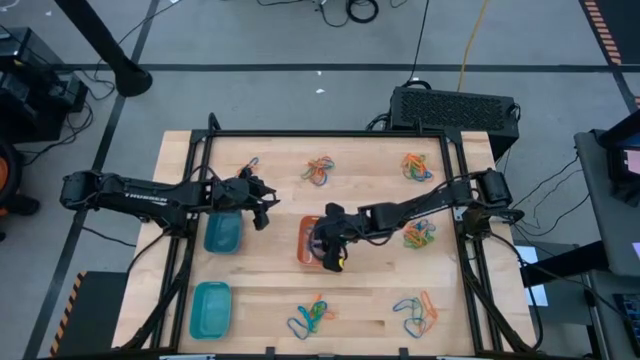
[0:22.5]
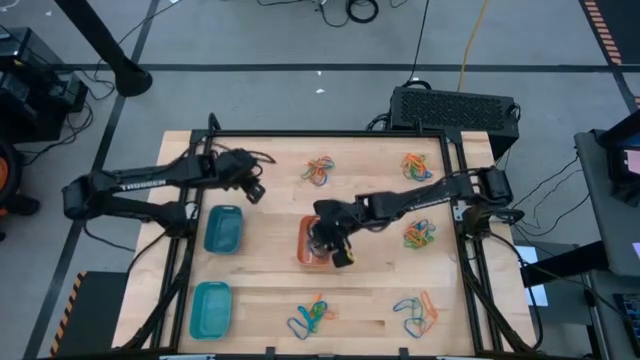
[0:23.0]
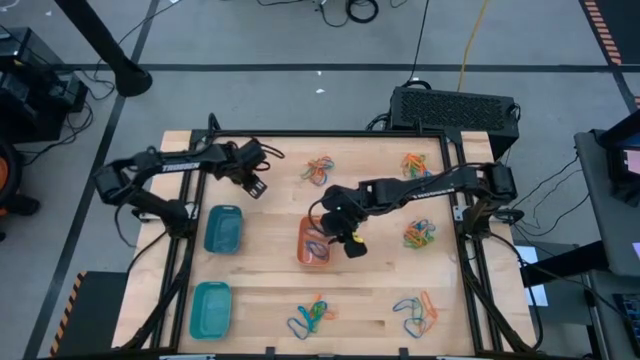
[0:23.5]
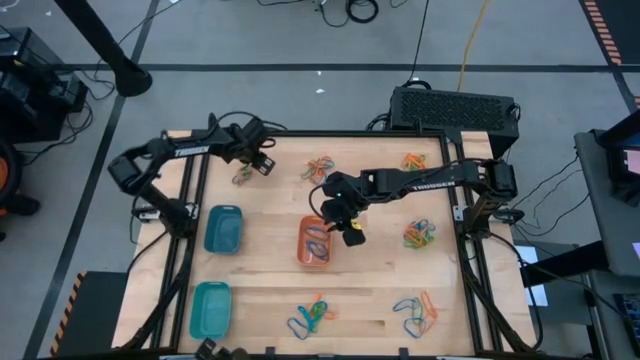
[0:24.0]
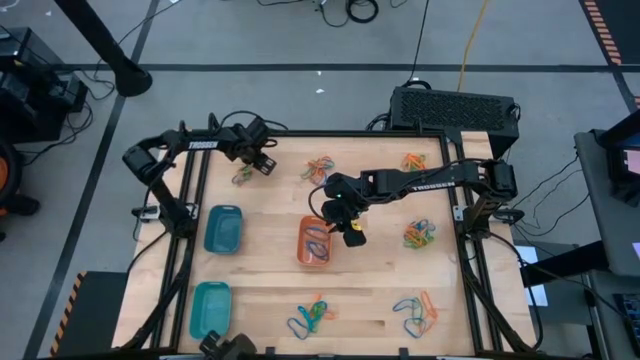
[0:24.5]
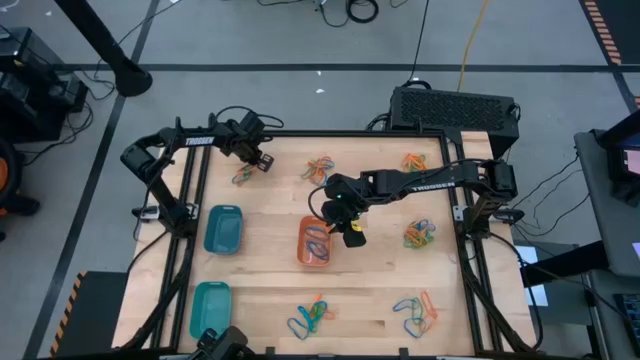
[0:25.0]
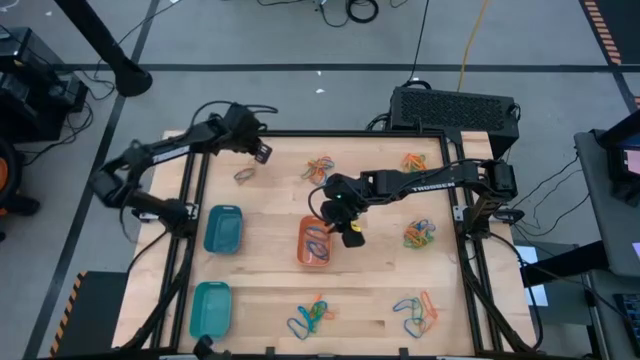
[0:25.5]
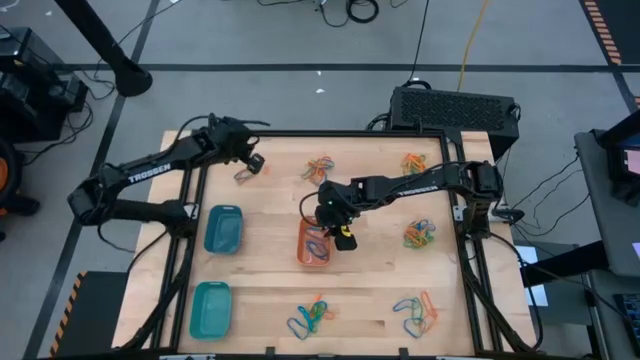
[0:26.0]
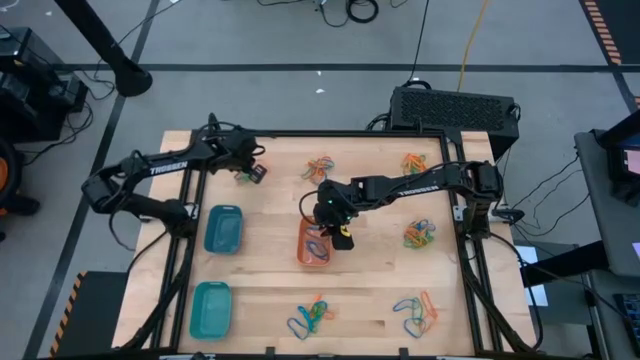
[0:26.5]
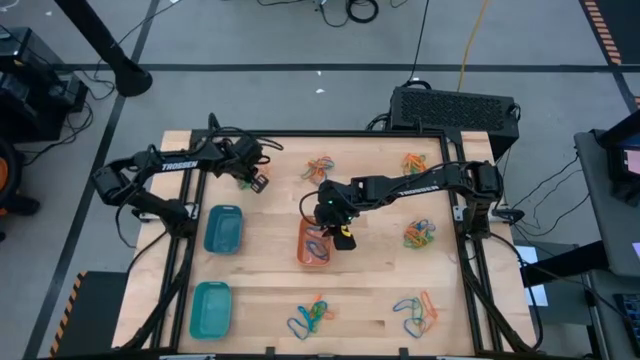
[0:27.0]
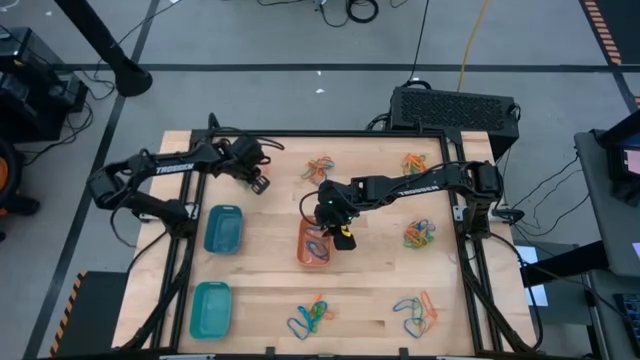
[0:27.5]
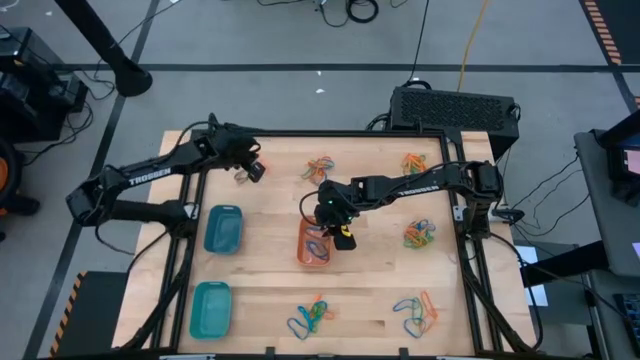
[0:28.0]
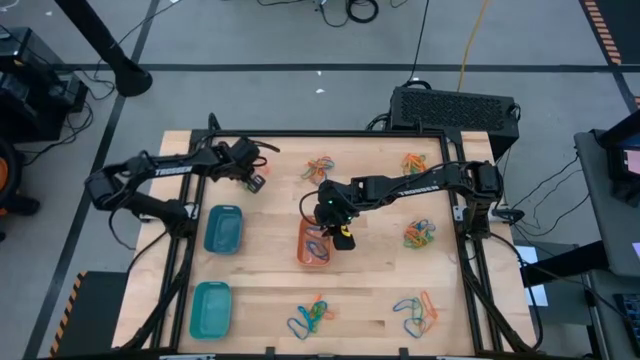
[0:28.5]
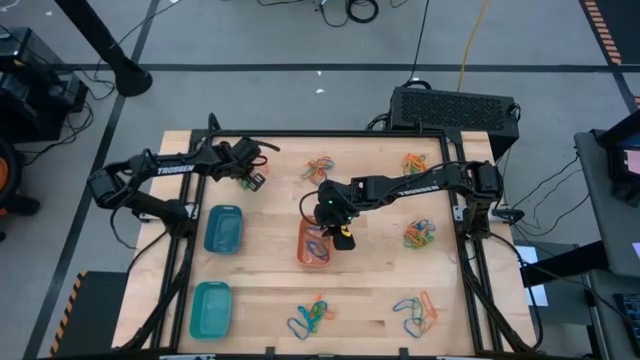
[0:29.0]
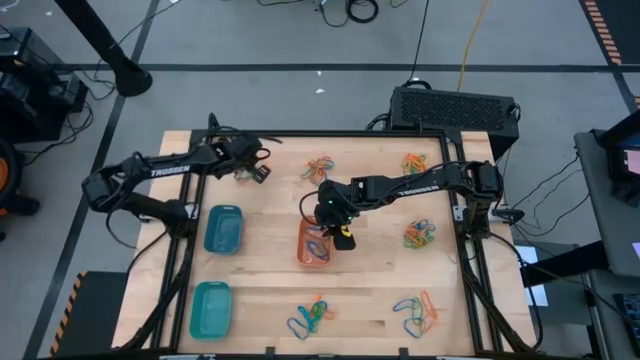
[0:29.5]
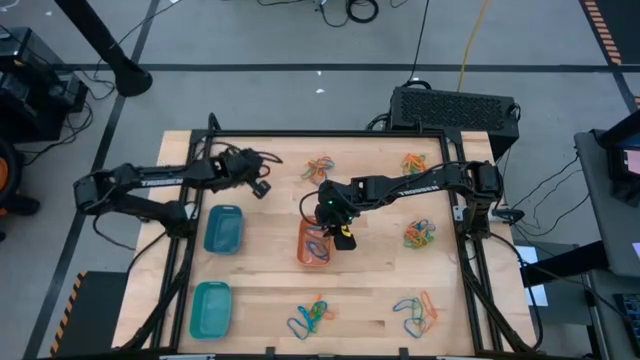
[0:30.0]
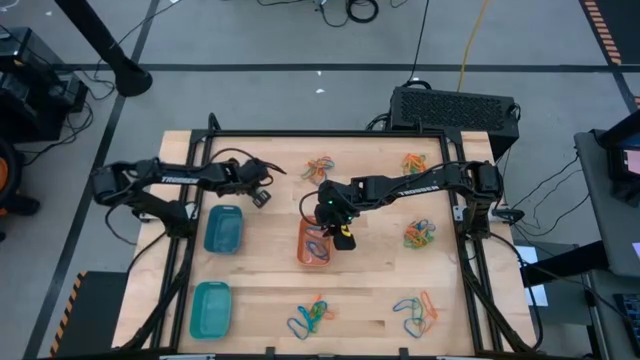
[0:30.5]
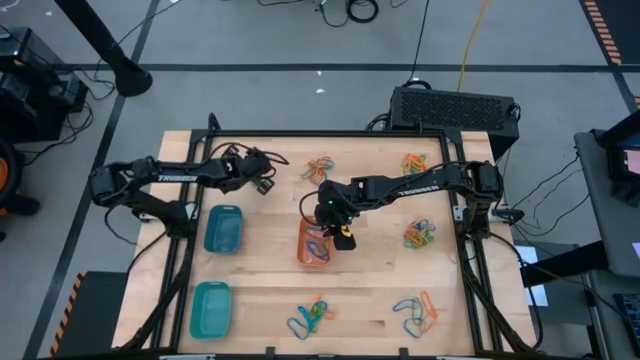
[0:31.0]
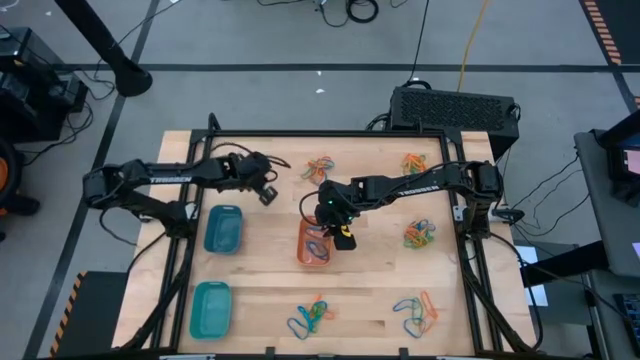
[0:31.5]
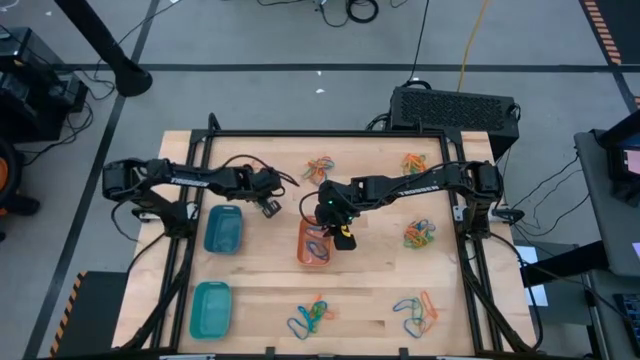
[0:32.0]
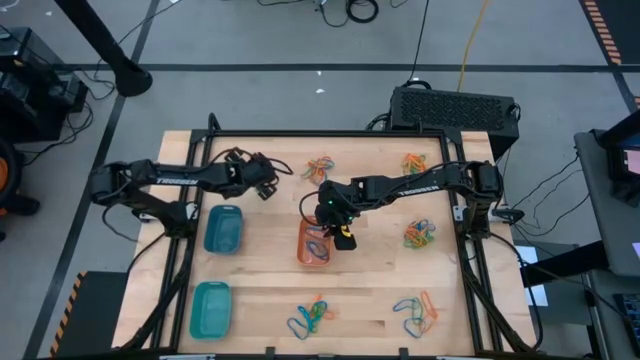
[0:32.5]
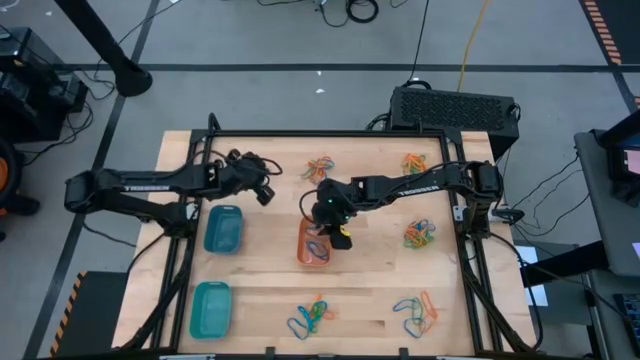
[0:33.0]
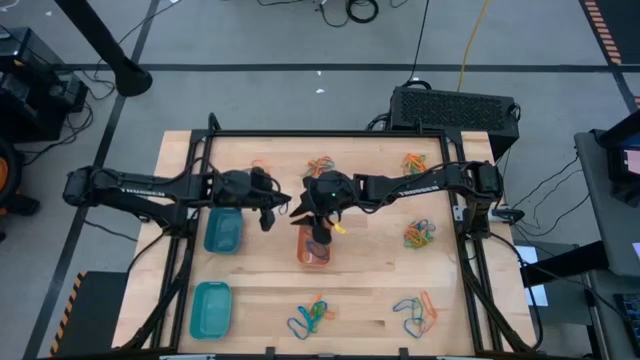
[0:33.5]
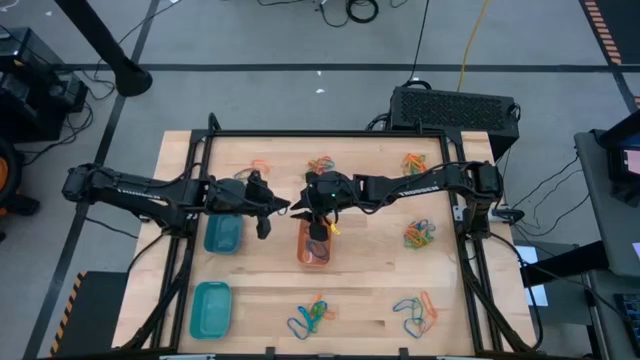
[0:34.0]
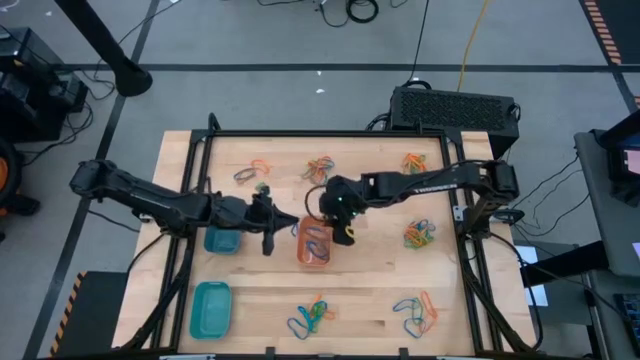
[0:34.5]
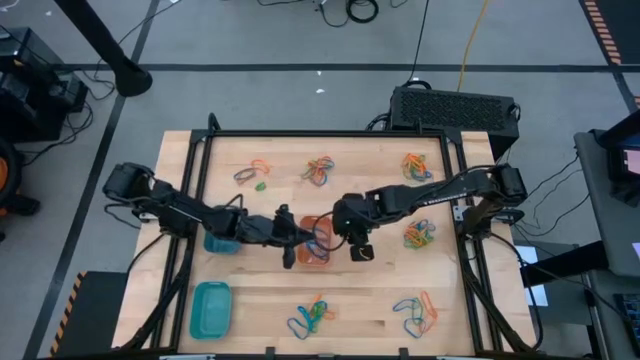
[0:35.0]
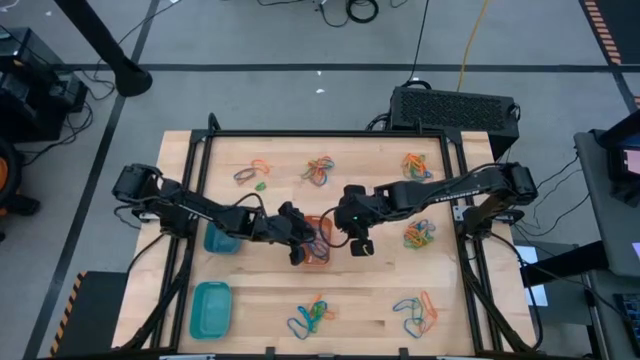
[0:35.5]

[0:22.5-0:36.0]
Task: Sort rubber bands into baskets
Put the blue rubber band into the orange bin

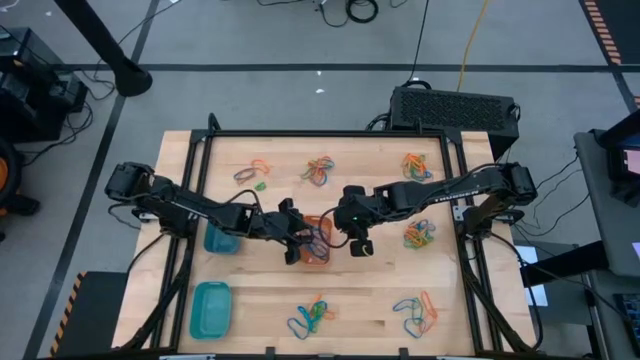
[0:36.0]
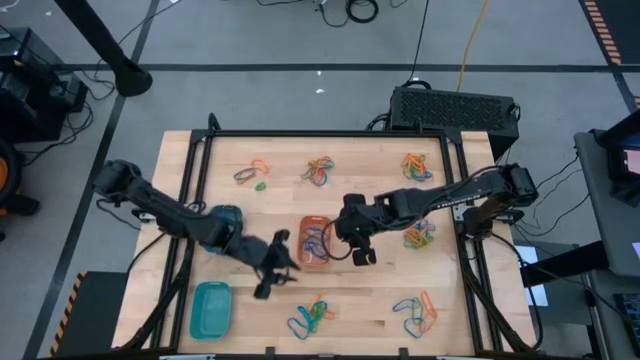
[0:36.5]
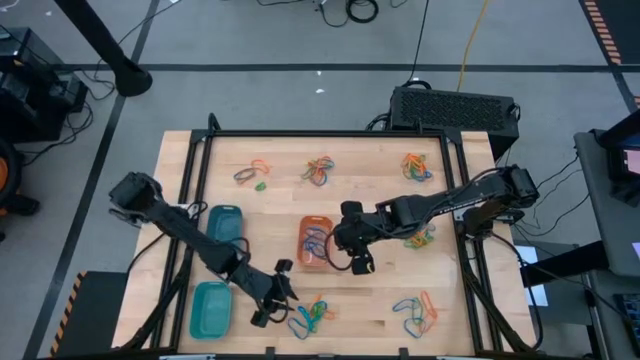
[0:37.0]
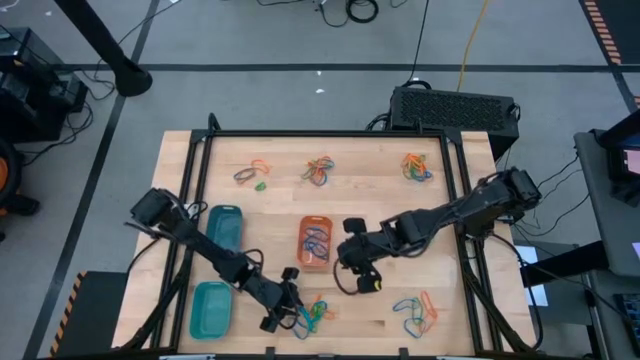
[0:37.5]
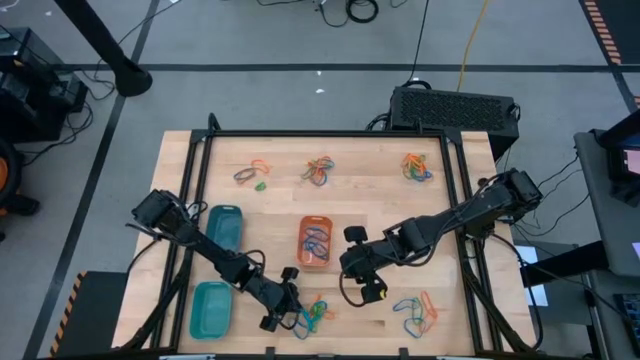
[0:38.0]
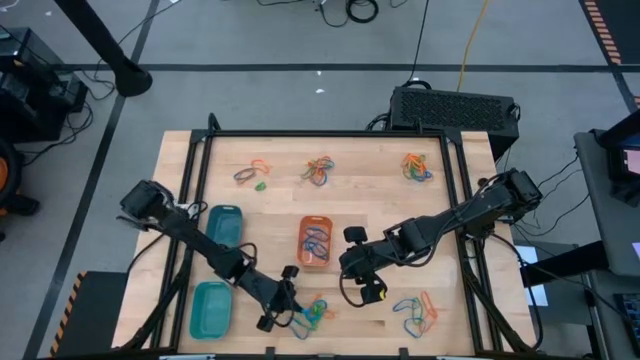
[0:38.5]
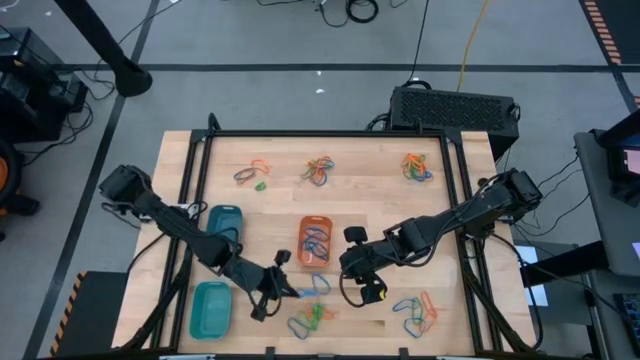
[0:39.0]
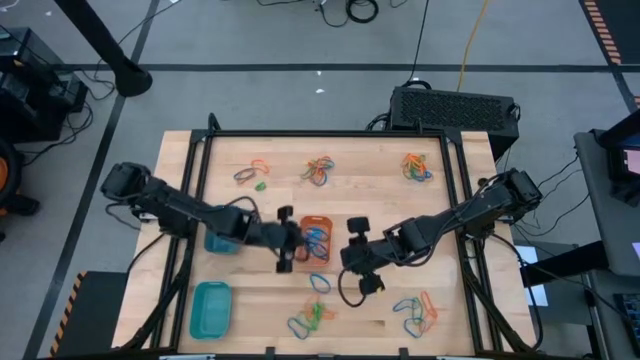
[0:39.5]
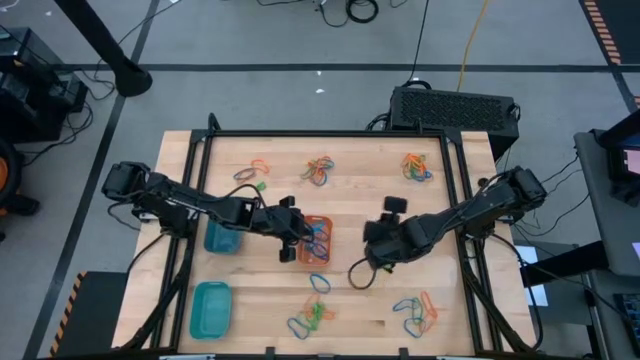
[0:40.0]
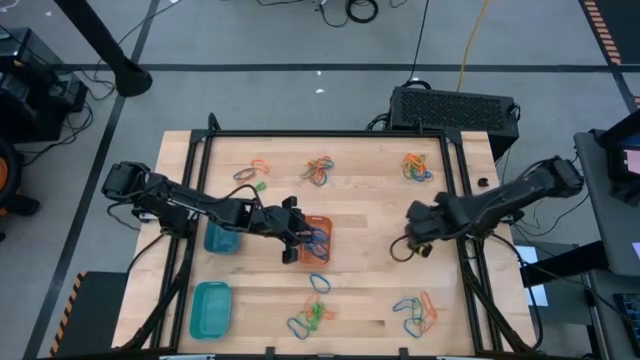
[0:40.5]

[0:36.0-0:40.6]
Put the blue rubber band into the orange bin

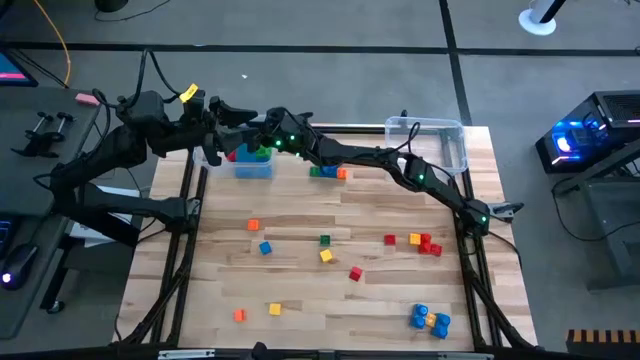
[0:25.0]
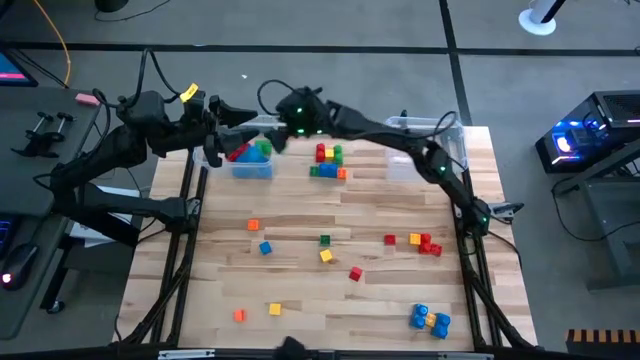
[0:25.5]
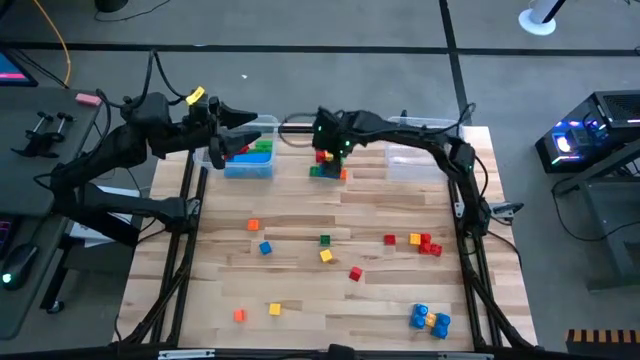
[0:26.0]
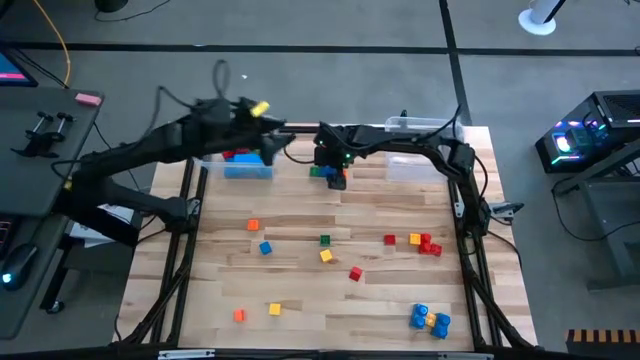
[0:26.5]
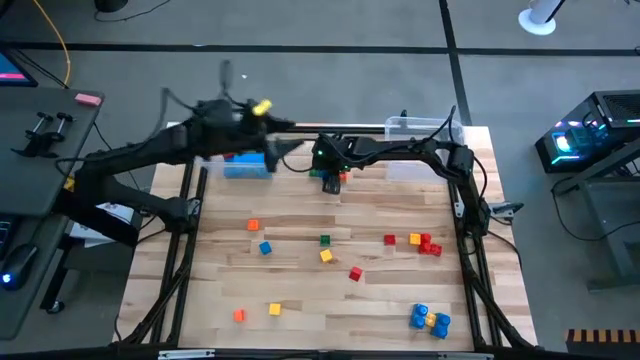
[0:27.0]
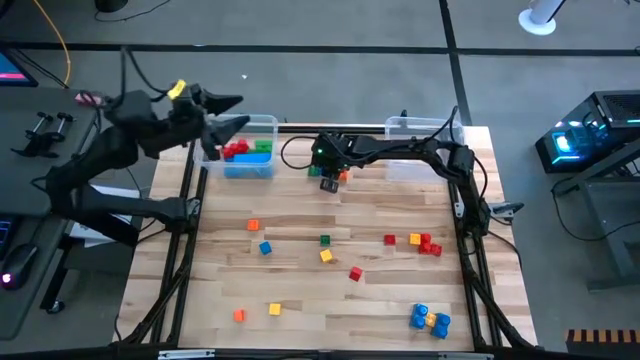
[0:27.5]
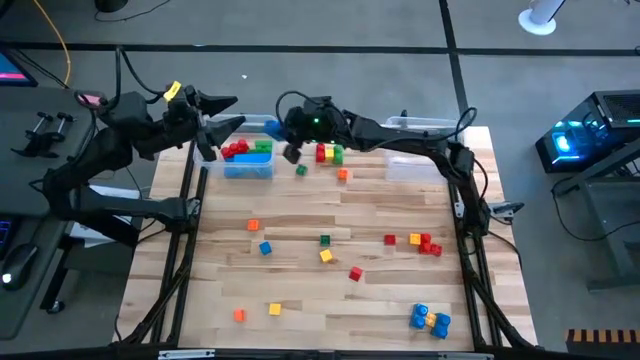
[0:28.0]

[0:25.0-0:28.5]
Task: Sort blocks by size
Put the large game piece into the left transparent bin

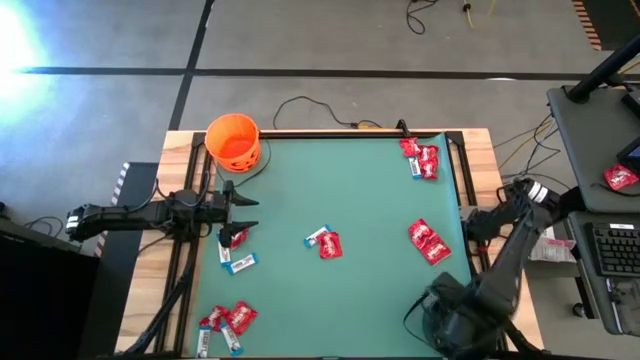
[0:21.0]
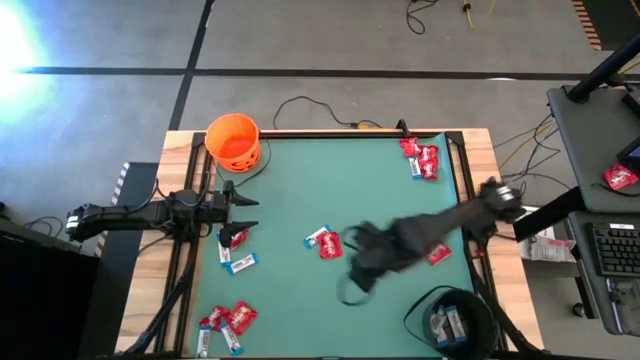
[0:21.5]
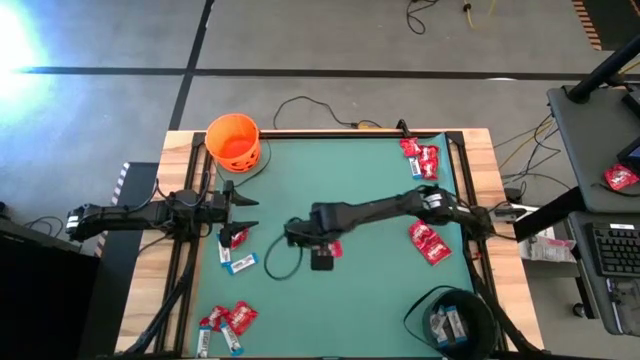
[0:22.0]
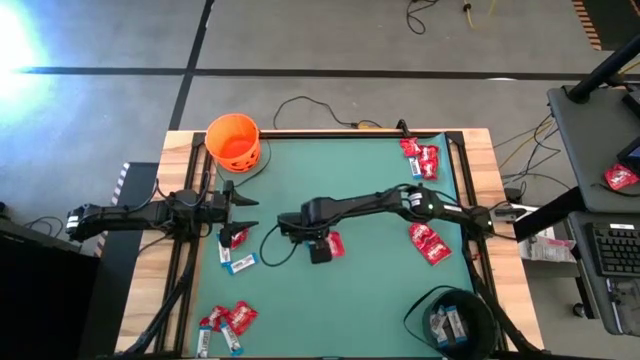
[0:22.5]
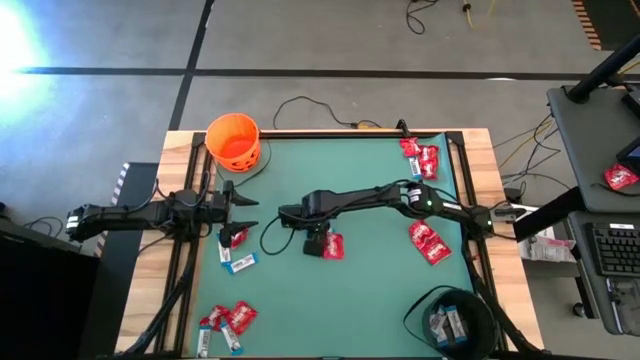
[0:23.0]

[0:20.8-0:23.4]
Task: Sort candy by brand, put in halloween buckets
Put the white chocolate into the black bucket
